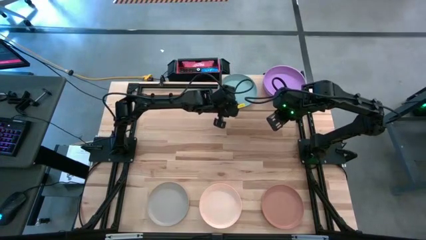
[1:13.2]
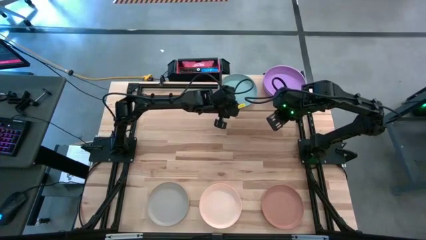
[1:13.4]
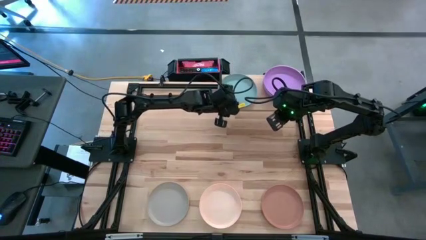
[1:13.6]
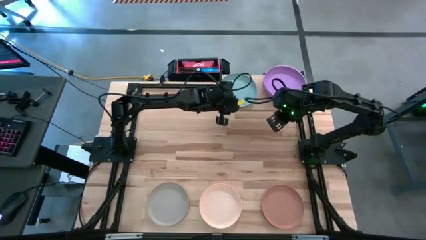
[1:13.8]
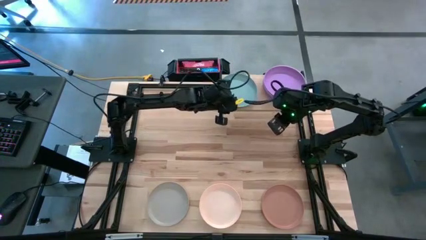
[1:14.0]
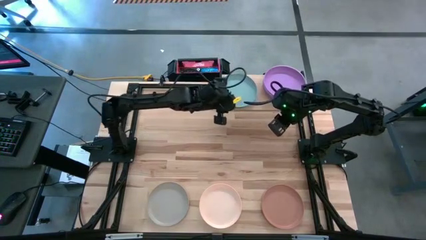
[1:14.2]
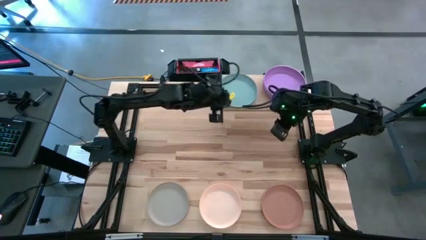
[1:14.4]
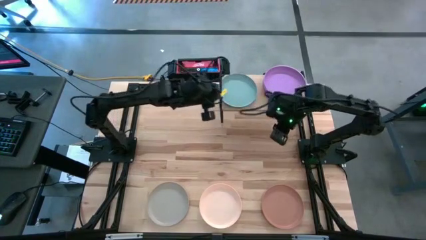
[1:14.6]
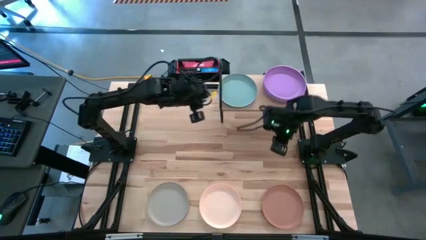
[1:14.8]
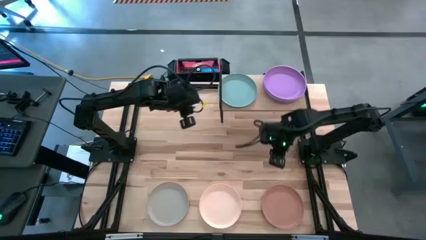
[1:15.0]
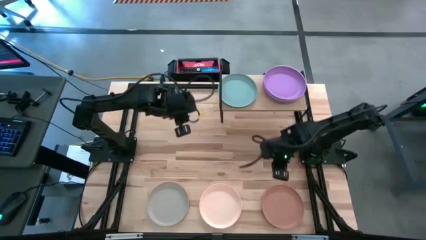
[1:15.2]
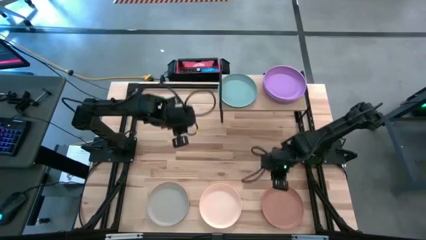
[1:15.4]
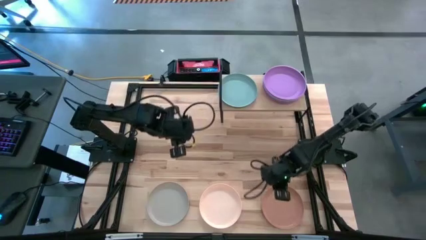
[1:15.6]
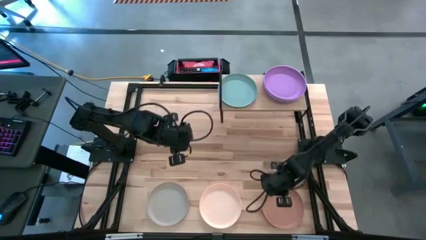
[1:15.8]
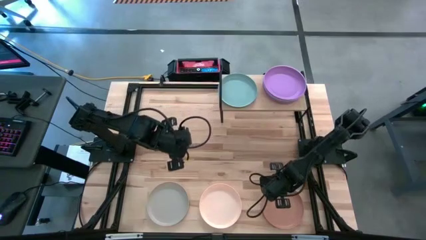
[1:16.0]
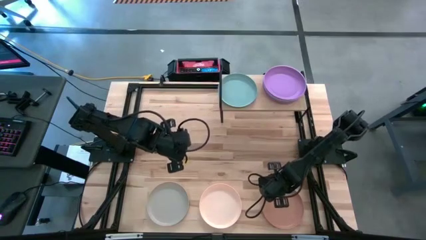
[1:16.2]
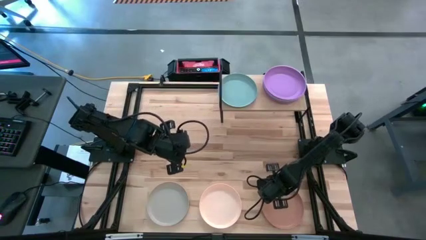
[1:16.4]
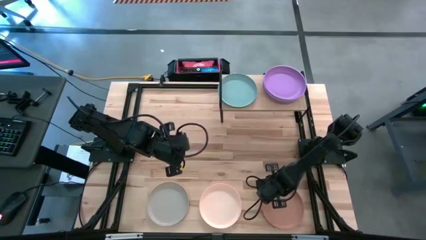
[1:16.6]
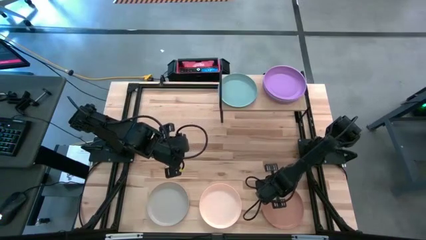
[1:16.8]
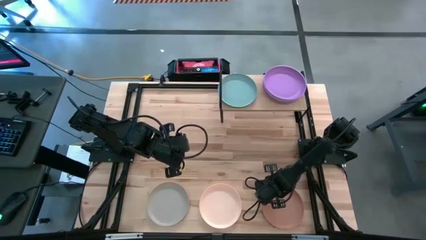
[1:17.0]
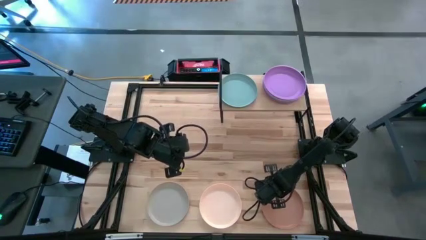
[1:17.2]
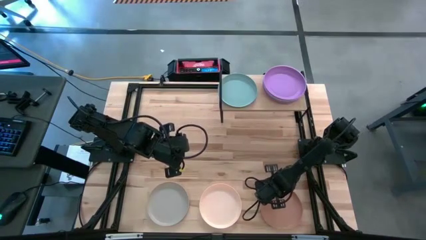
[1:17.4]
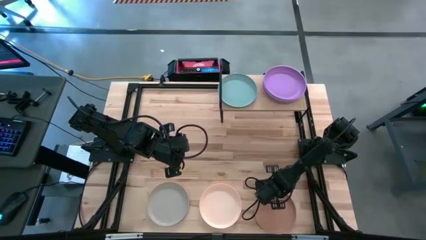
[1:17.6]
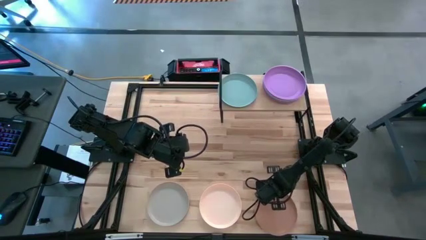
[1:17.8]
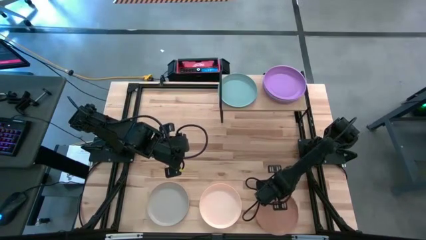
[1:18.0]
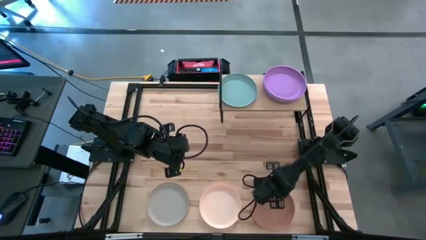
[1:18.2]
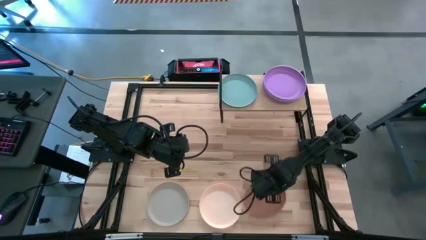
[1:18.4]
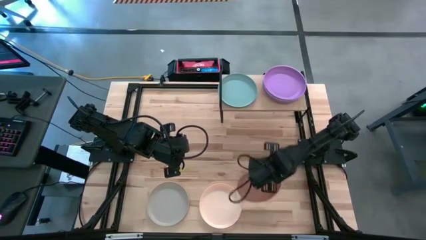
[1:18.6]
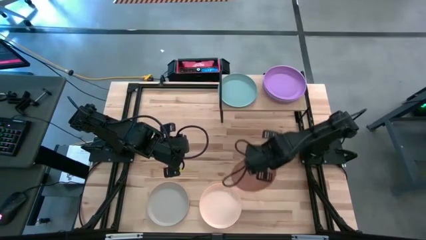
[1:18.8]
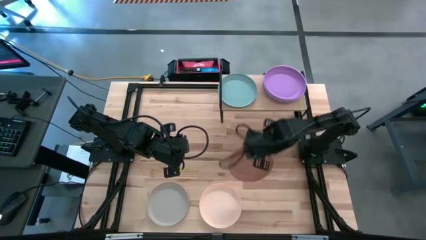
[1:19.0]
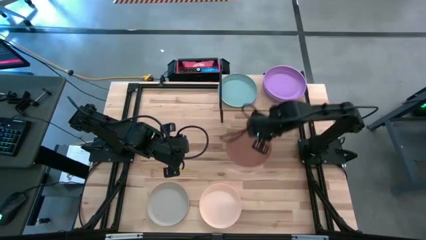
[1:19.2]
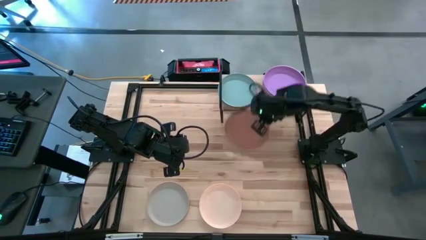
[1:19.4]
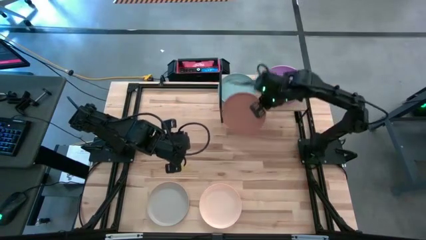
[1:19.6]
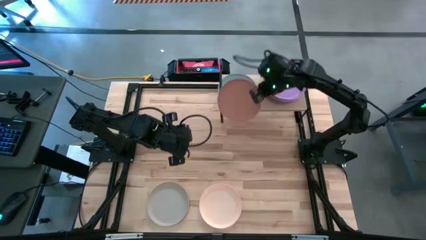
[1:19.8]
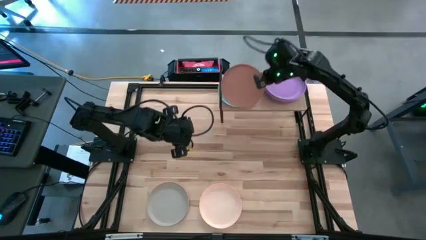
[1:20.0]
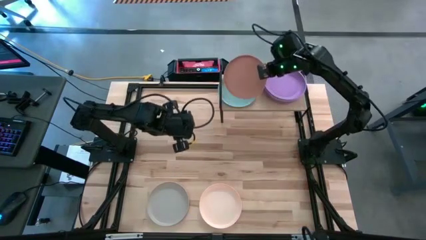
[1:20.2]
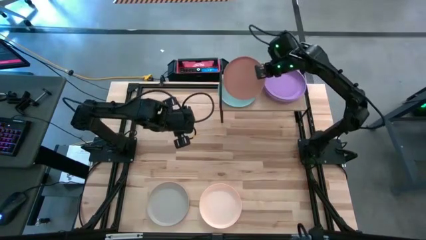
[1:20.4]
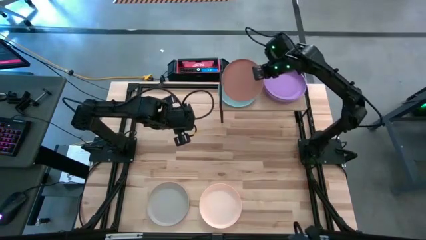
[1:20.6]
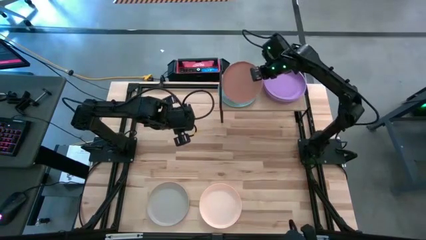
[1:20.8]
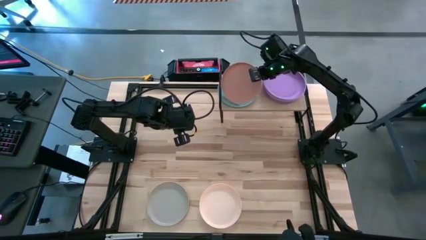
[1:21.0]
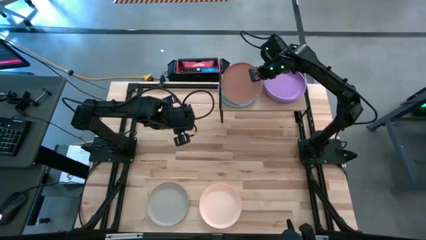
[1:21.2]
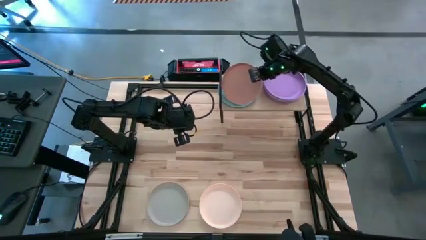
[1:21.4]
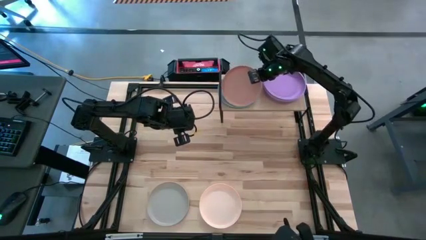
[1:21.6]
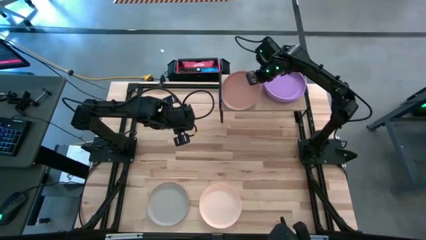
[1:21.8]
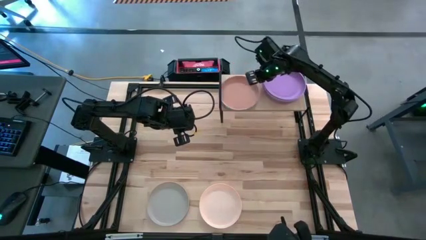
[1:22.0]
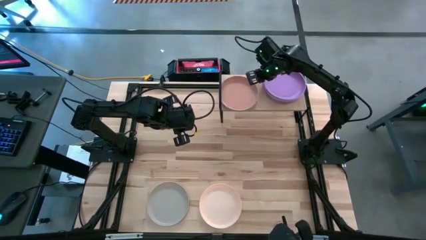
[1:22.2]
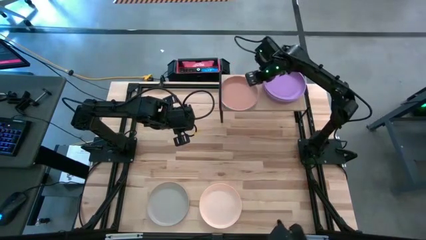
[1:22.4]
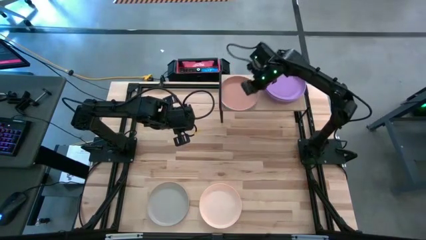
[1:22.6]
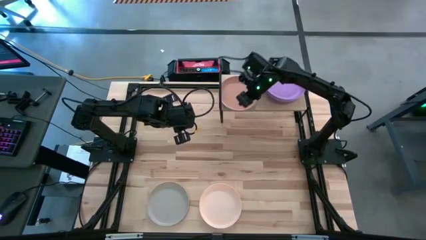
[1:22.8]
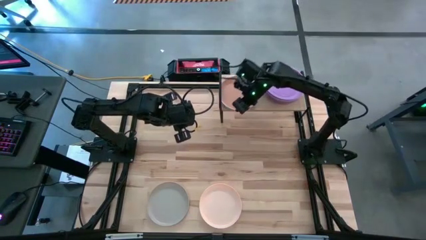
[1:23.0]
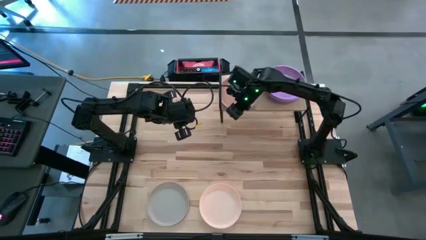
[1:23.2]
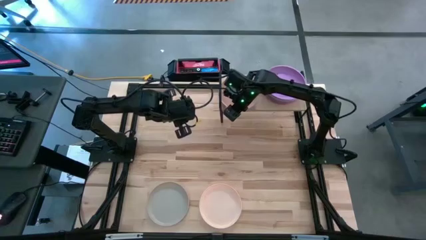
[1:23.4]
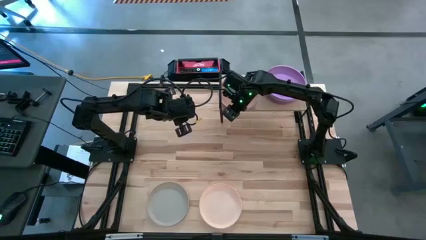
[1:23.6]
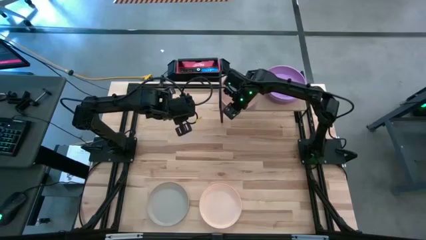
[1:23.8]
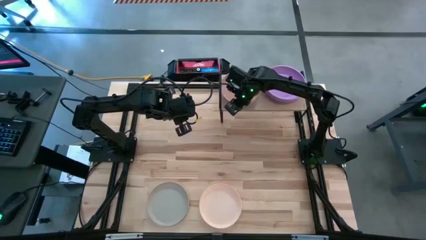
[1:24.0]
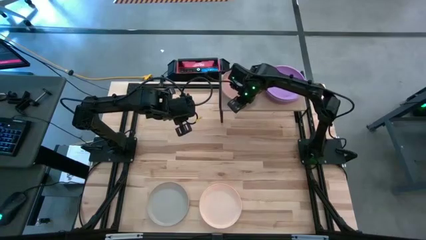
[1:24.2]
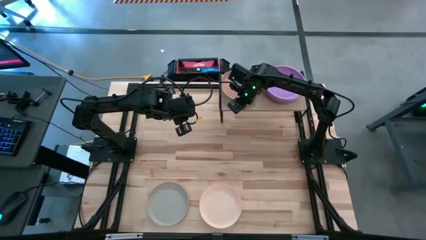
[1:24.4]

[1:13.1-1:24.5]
Task: Place and stack plates onto a shelf
Stack the brown plate on top of the light blue plate on the shelf

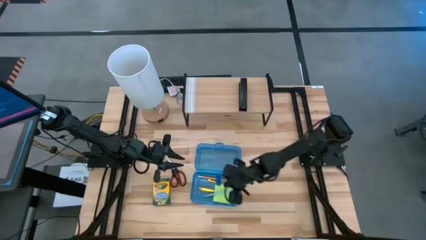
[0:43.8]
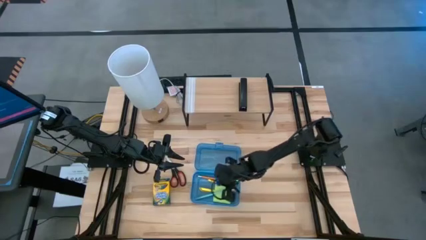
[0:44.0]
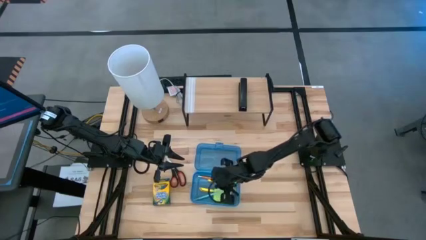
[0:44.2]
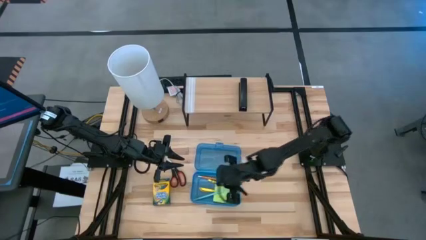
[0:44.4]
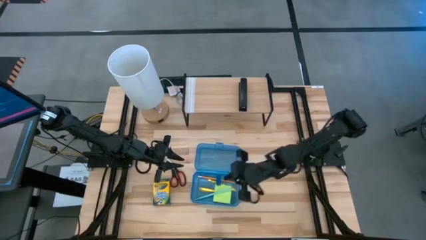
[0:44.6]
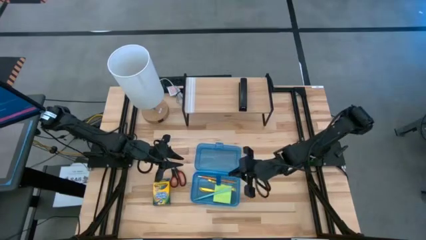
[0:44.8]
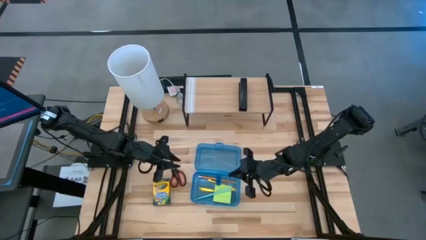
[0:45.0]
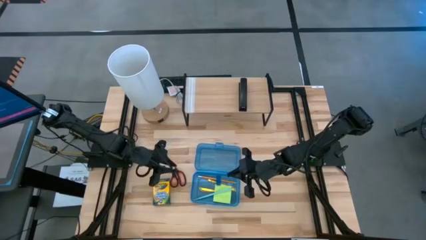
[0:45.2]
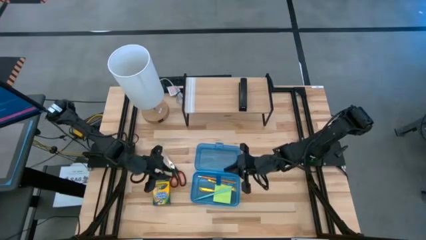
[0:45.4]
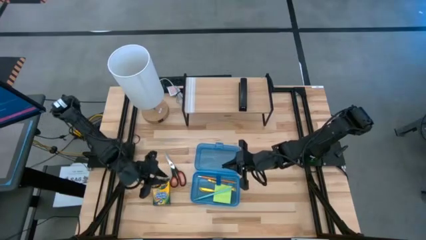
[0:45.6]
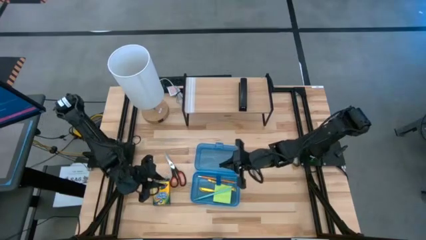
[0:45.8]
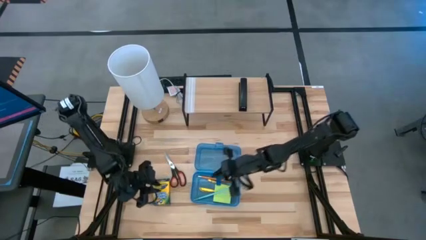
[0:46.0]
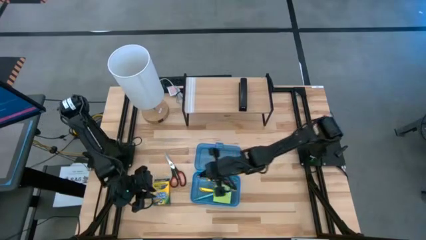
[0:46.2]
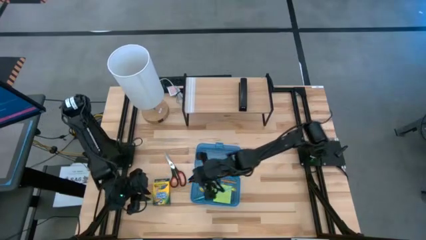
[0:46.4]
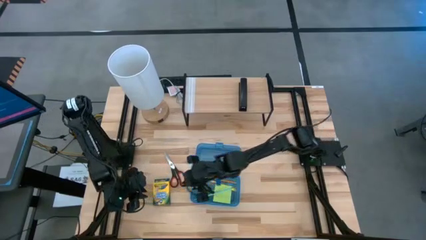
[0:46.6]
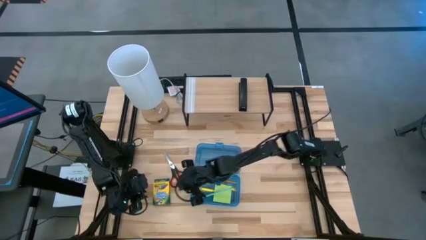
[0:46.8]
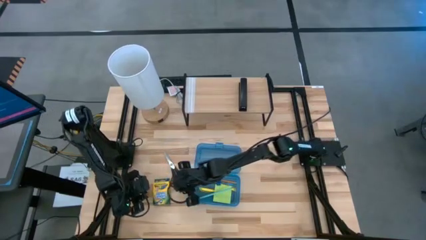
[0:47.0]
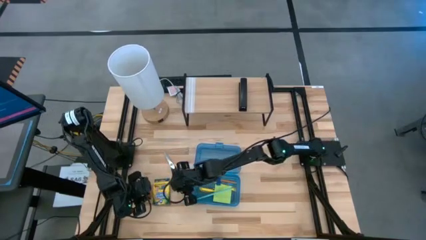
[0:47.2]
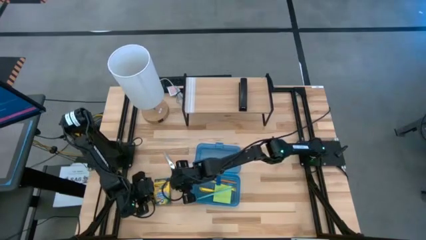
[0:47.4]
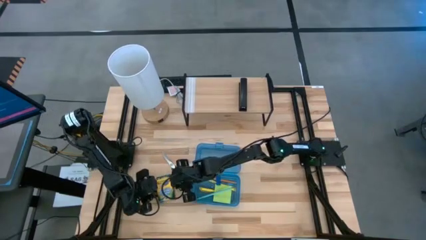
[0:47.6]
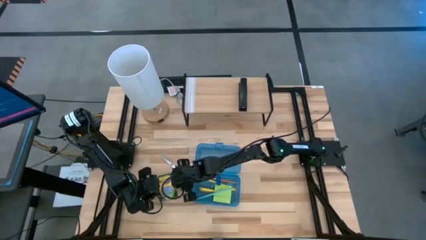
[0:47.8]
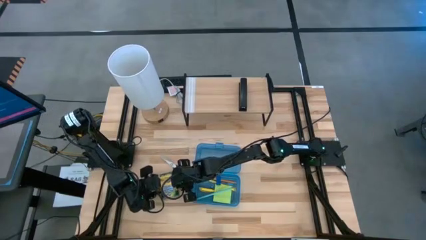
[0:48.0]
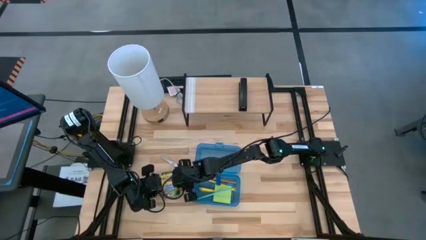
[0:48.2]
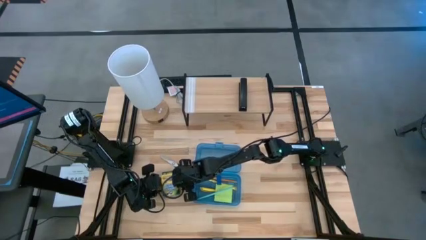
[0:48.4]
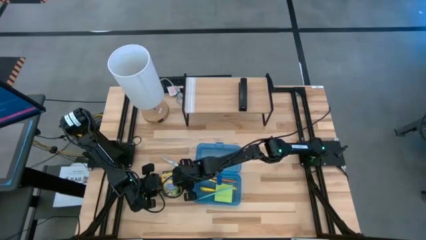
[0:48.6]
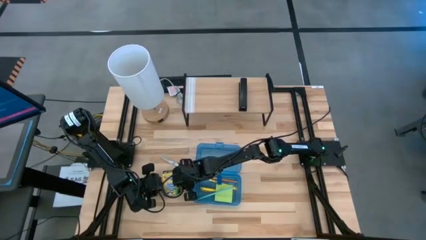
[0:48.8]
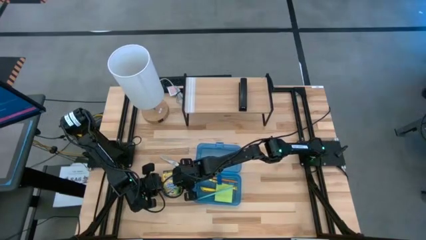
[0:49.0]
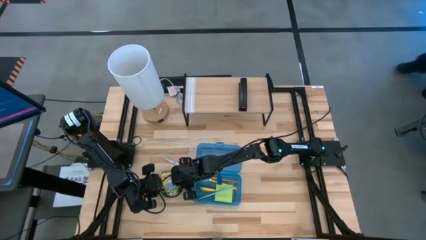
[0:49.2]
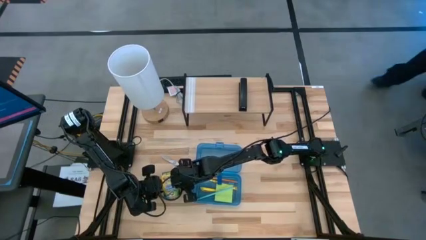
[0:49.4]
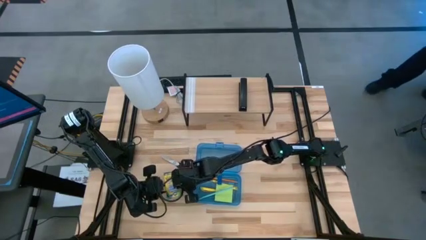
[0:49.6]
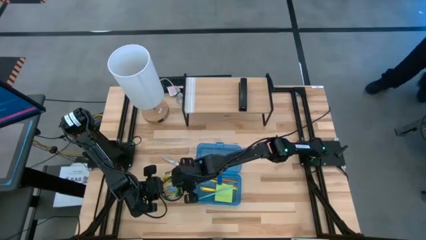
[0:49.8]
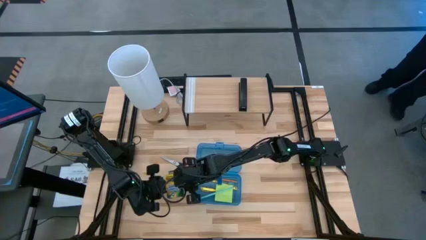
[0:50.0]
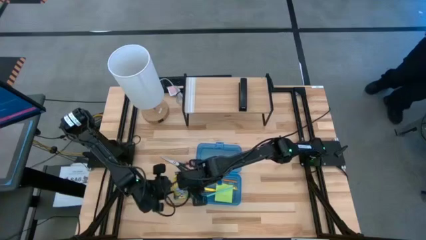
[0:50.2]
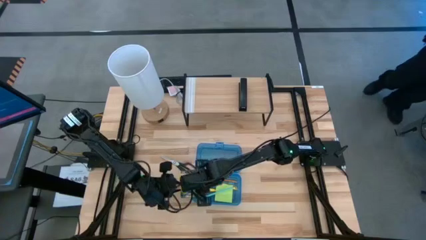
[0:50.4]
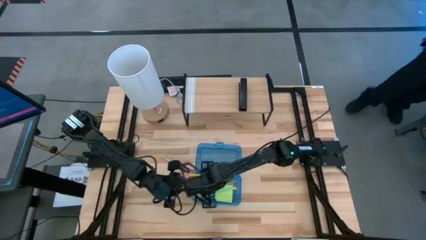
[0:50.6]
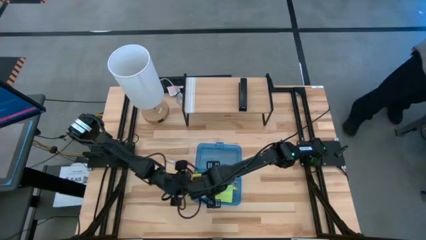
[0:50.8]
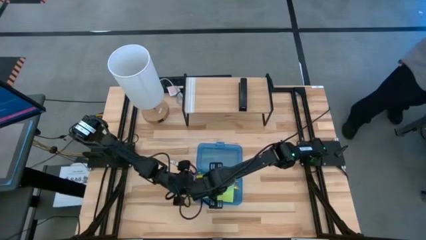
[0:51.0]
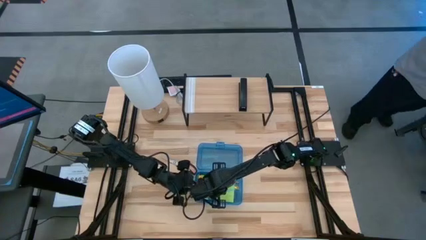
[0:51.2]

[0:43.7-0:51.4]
Task: Pack school essentials
Put the yellow crayon box into the blue supply box
